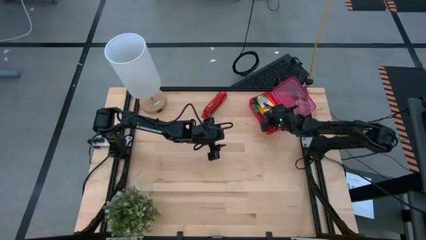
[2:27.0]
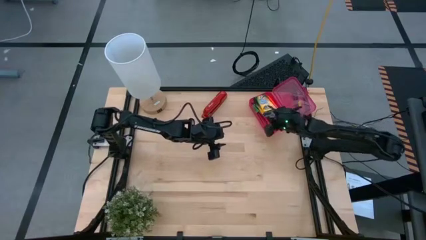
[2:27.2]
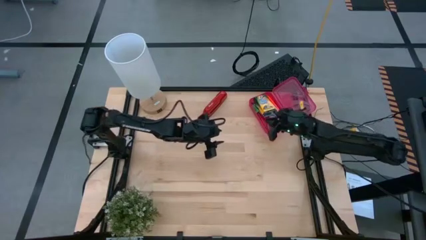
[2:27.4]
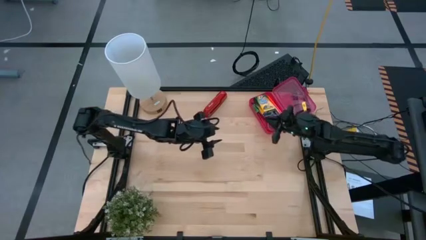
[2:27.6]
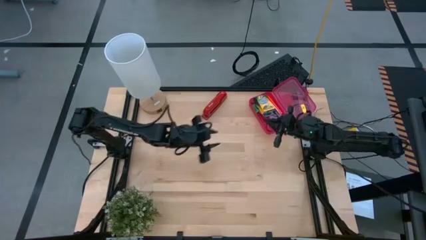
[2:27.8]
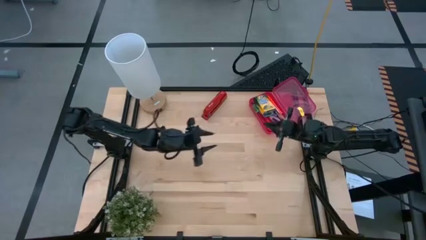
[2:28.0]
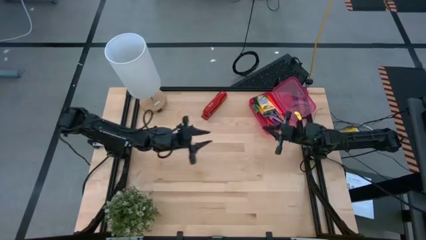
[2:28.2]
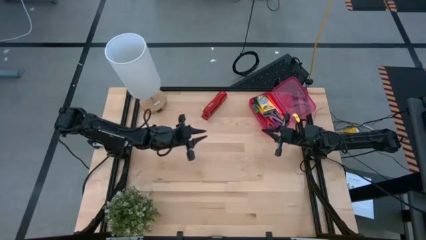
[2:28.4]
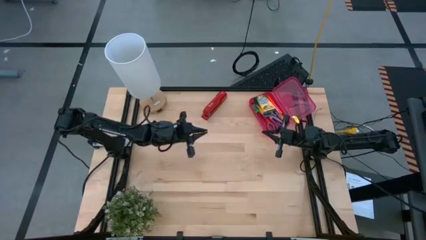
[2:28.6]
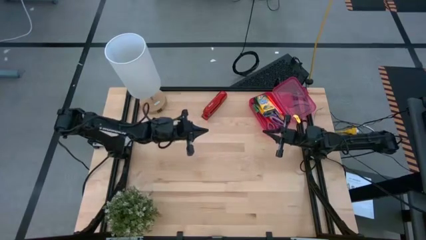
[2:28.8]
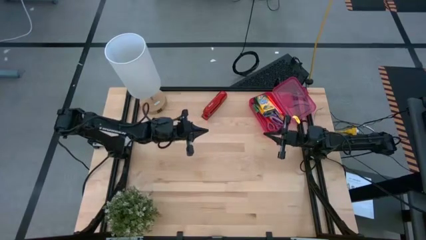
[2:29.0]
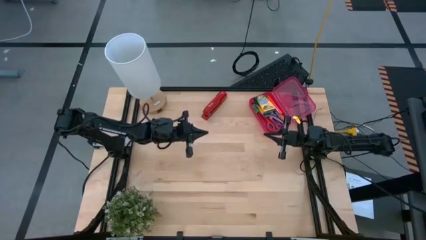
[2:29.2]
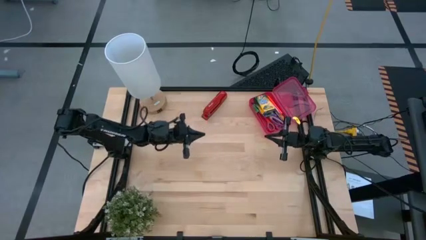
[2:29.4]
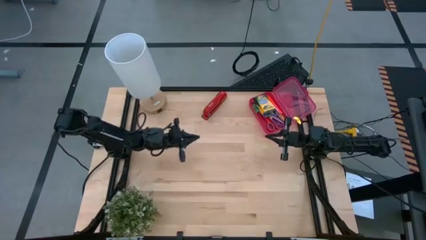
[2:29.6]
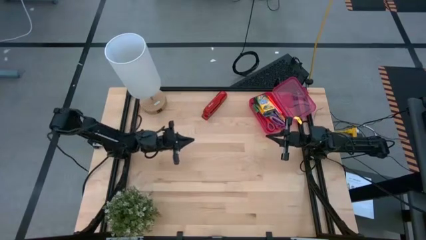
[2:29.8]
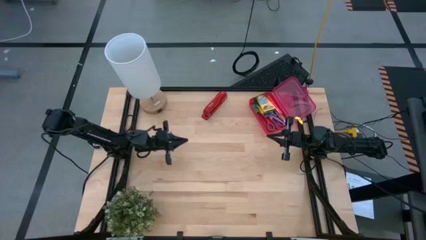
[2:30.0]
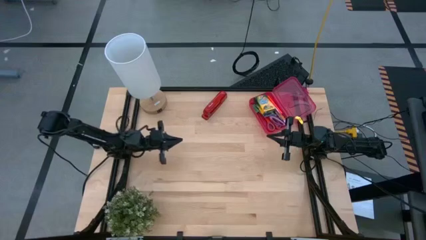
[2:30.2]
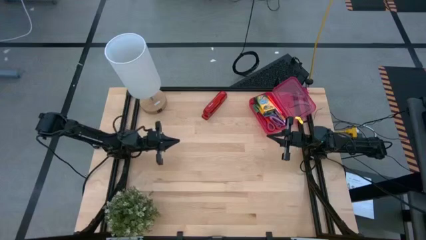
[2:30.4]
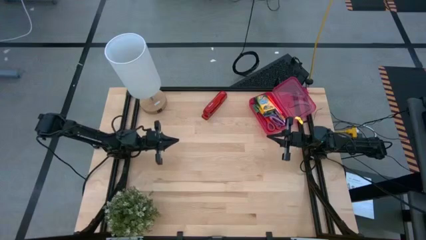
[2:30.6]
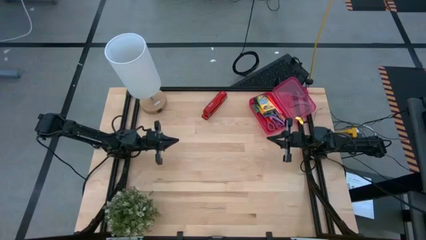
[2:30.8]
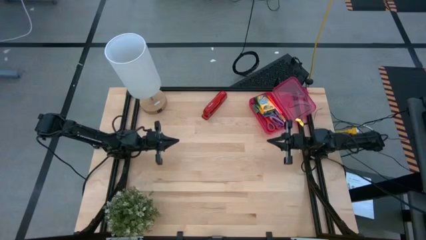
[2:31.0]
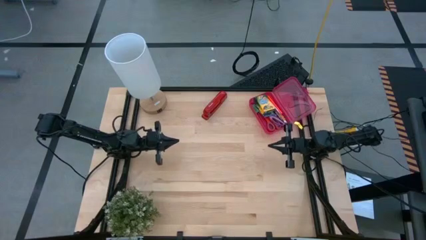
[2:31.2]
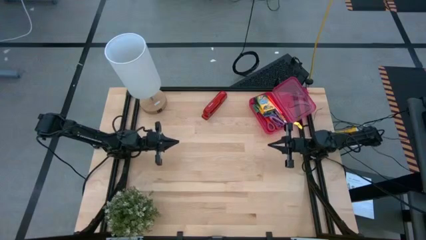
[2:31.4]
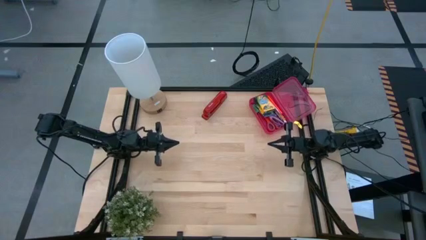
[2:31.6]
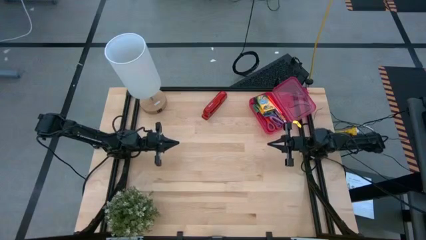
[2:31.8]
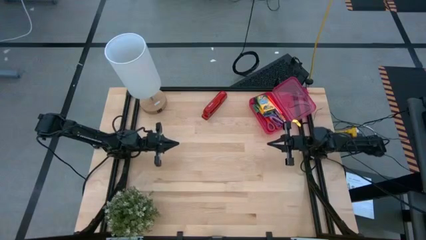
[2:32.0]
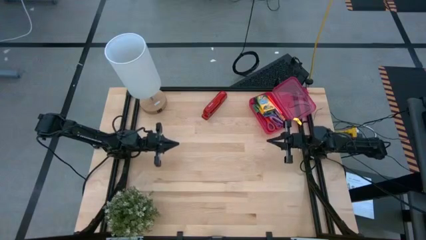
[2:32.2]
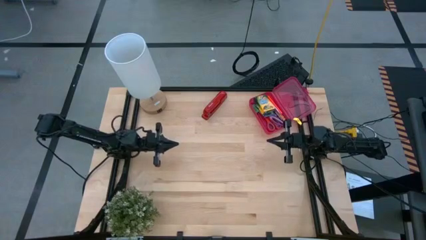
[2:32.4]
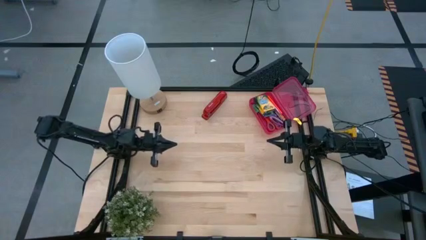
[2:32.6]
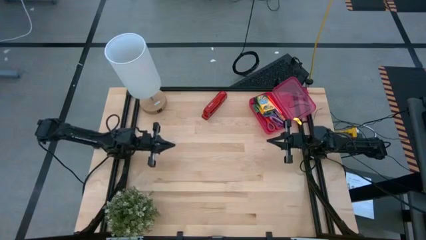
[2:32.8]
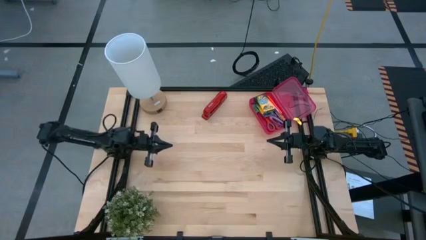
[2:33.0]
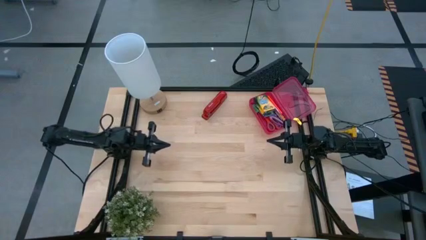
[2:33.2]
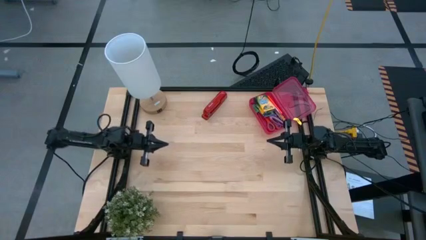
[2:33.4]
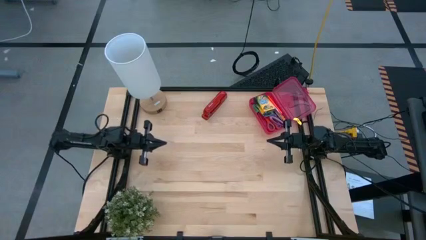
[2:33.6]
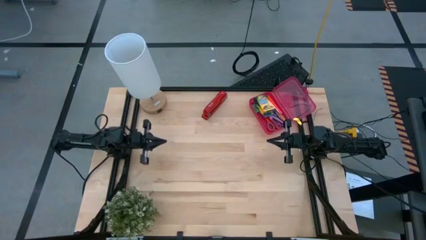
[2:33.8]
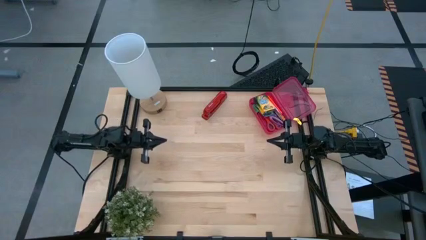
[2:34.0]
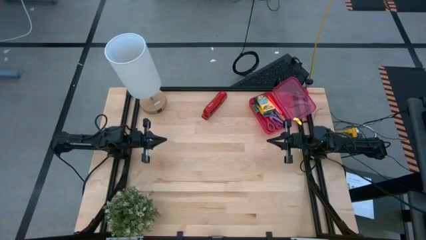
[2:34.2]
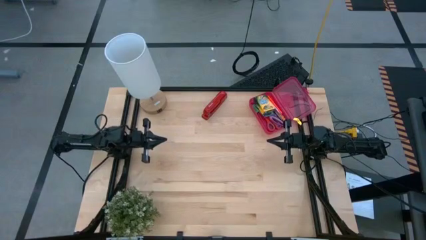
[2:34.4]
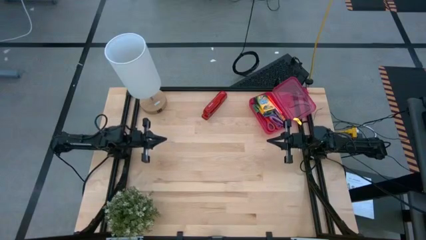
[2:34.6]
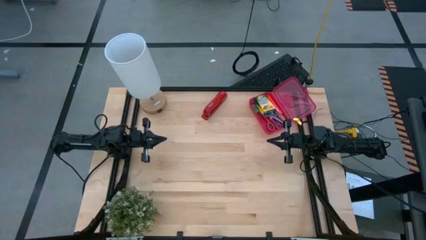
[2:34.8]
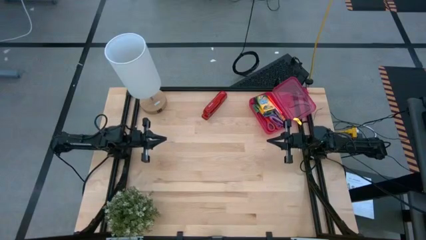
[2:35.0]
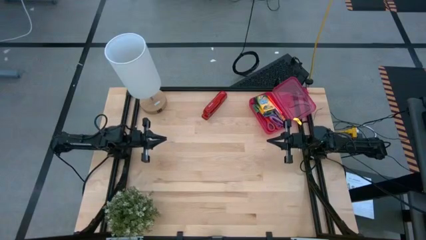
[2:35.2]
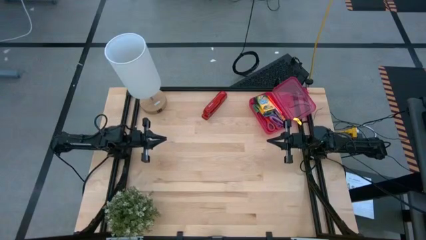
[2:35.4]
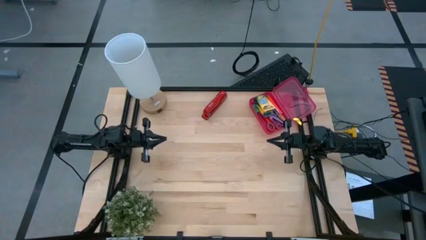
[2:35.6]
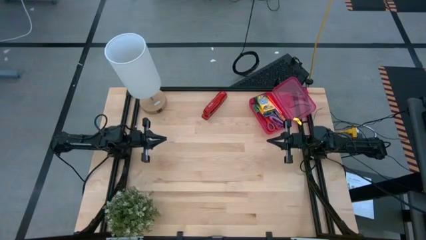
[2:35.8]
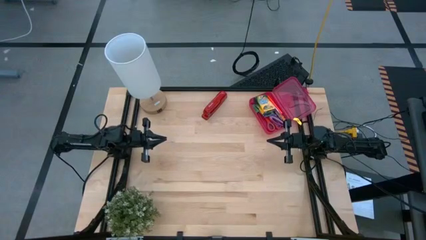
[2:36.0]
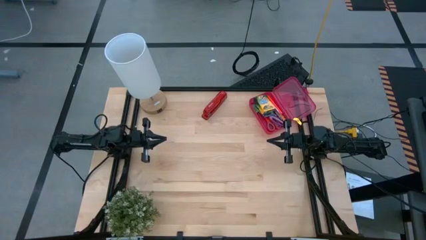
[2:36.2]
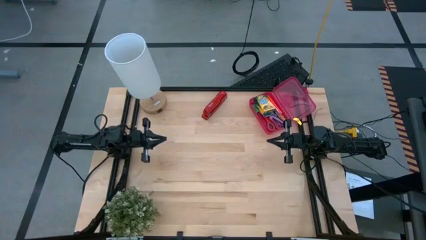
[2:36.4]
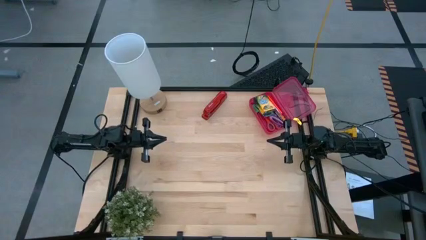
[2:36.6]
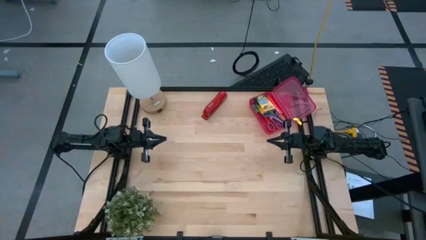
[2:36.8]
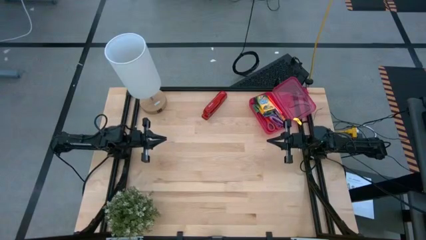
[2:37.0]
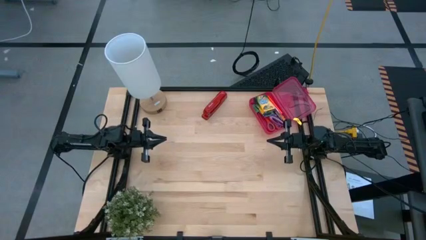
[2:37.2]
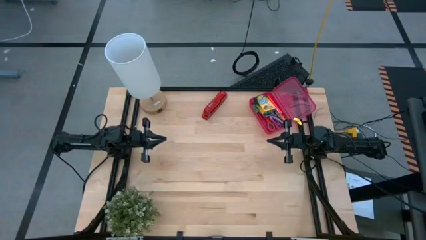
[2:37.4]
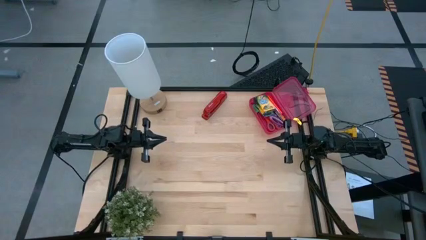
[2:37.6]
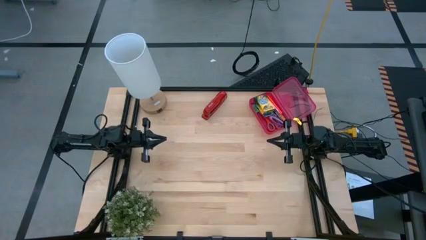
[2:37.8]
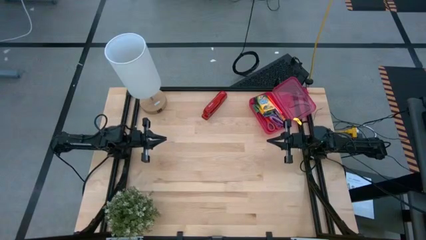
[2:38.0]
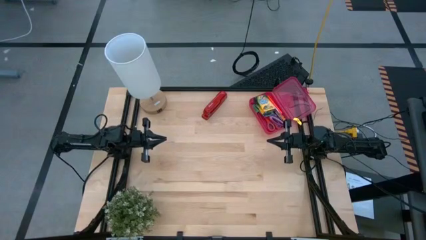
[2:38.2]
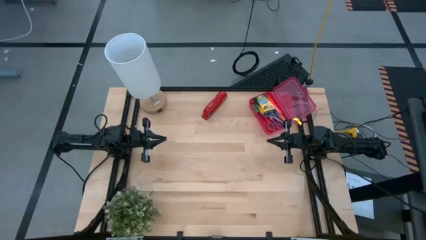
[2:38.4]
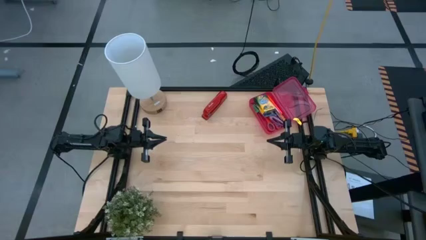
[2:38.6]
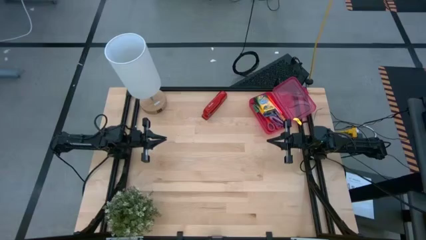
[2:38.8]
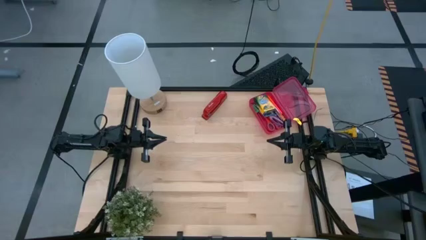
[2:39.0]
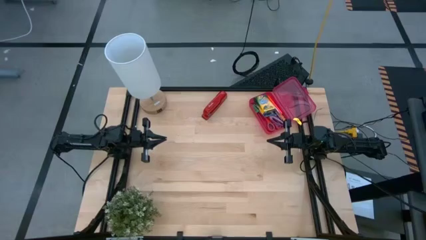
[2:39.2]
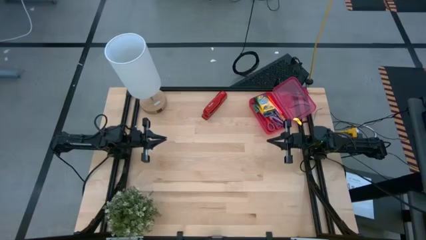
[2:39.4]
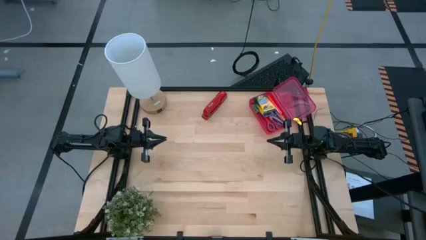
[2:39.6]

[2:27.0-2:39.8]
Task: Pack school essentials
Return to Home Position

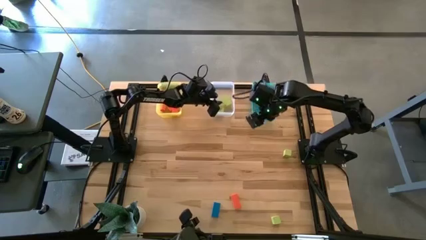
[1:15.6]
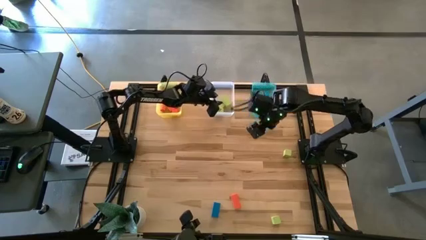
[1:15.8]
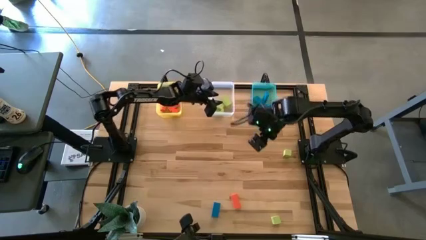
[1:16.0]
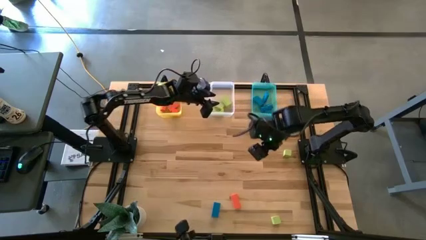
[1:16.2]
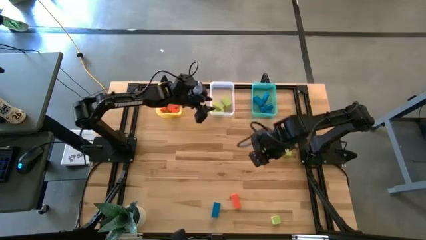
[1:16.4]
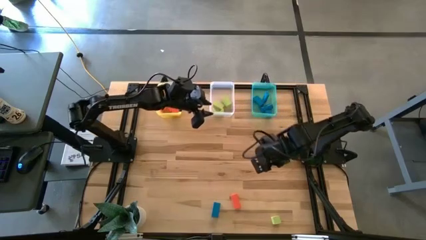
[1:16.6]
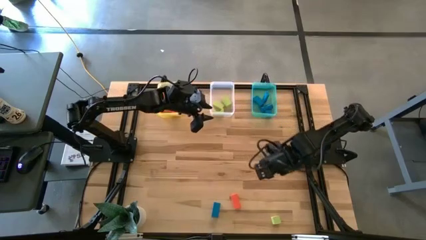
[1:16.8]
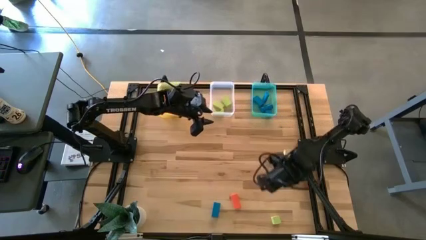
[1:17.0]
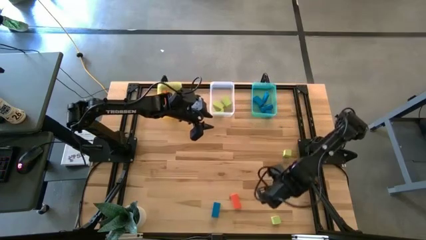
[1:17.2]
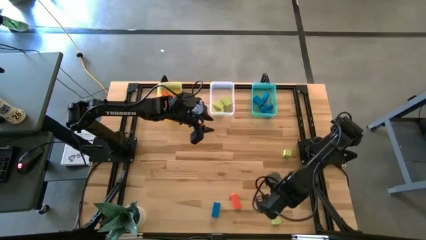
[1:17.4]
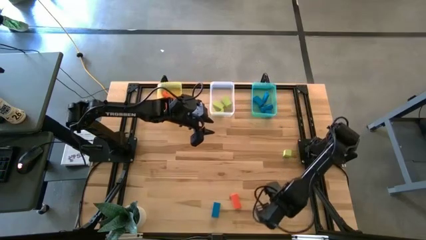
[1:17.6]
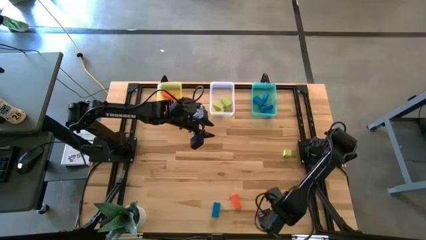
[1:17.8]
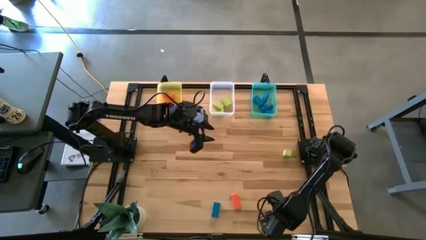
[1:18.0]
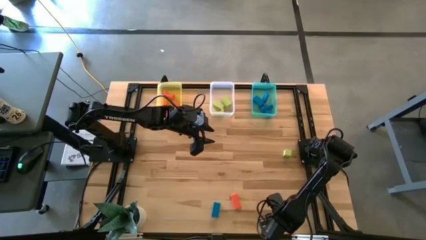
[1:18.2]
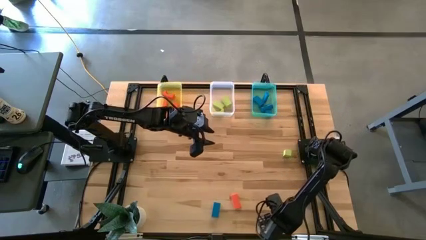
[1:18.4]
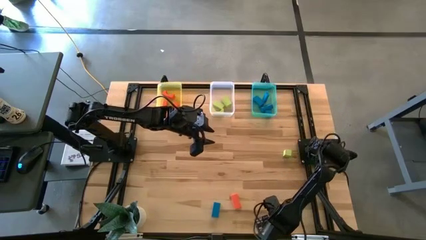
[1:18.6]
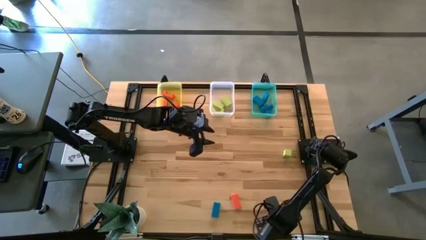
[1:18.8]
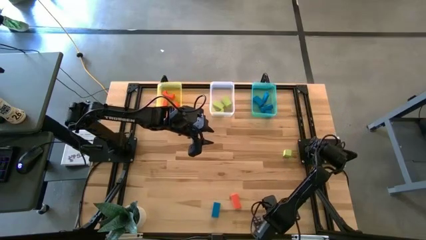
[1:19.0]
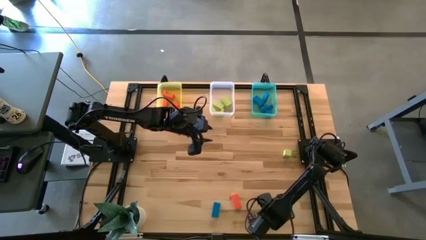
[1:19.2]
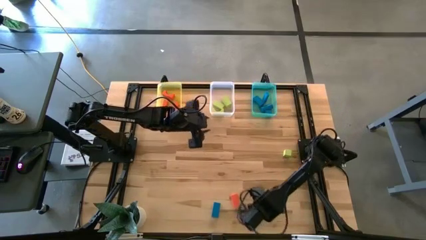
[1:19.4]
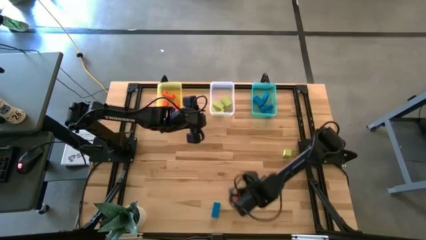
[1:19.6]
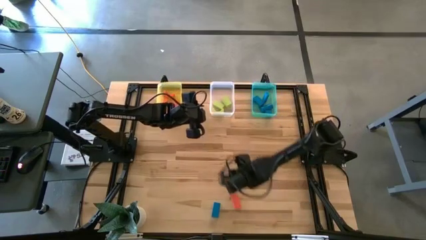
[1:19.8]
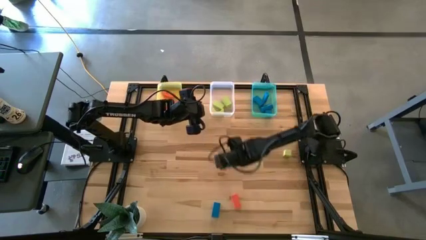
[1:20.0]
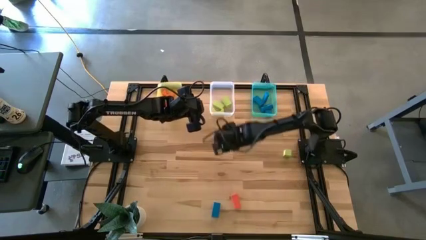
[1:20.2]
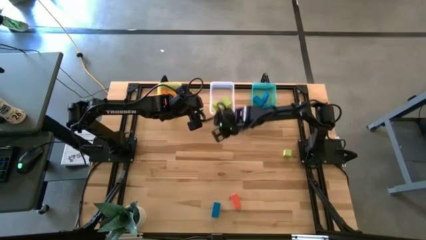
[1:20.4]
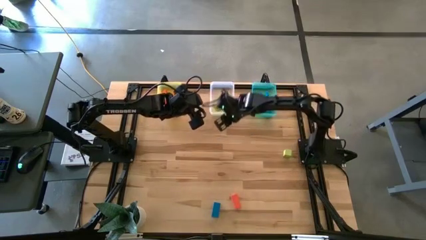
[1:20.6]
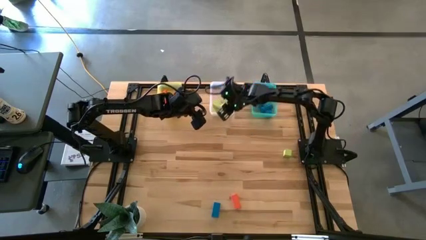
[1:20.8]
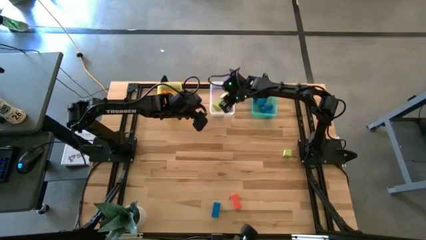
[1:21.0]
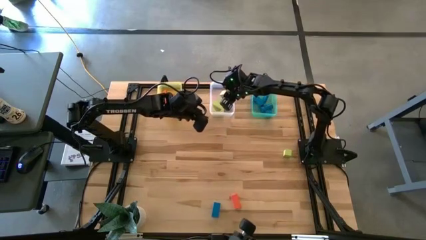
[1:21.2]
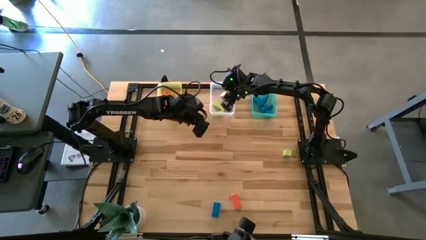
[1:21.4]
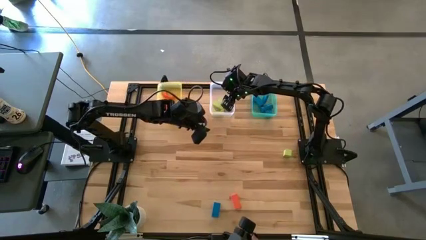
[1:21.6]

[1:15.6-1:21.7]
Task: Sort & place blocks by color
Put the green block into the transparent bin
